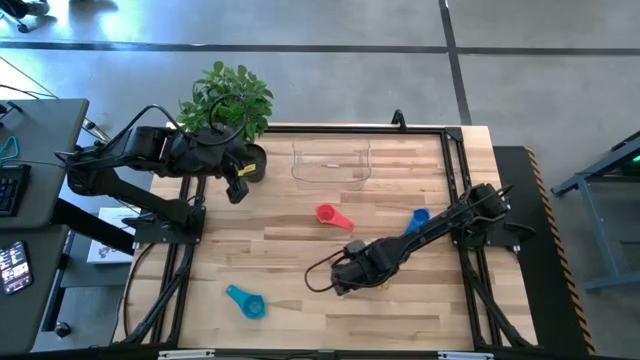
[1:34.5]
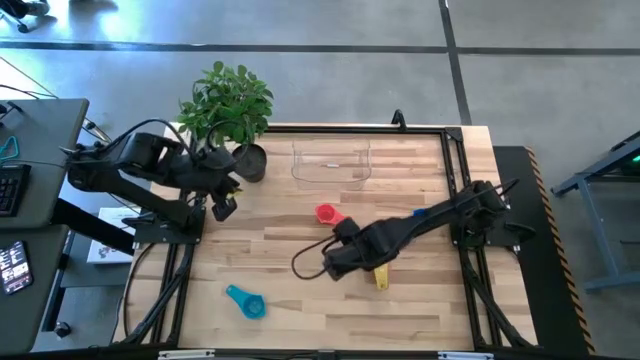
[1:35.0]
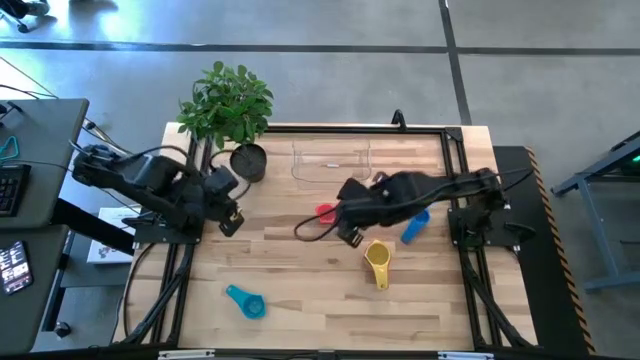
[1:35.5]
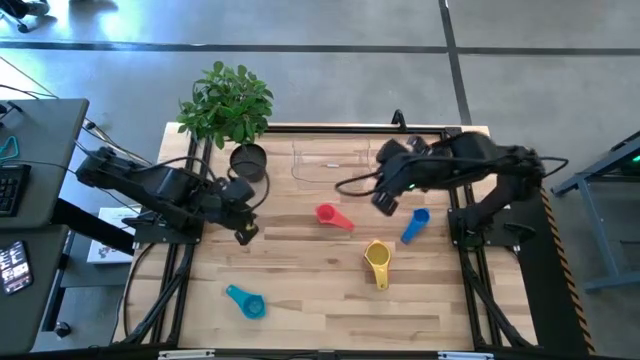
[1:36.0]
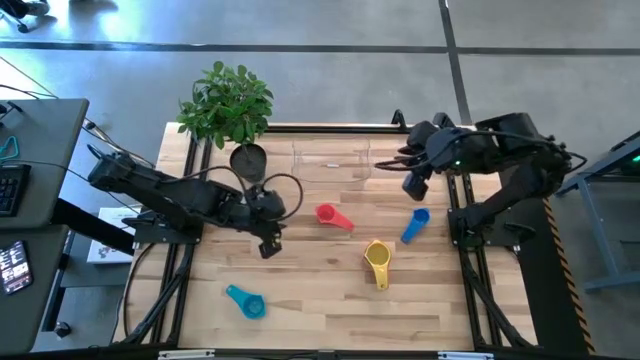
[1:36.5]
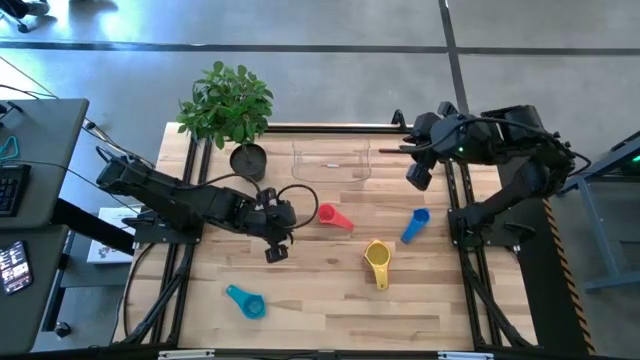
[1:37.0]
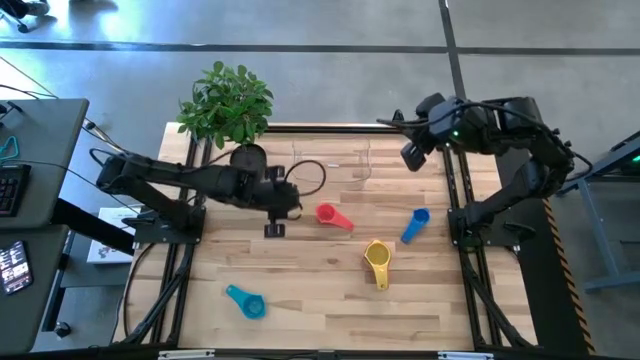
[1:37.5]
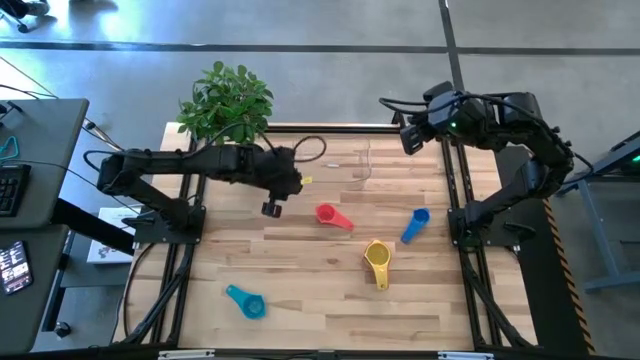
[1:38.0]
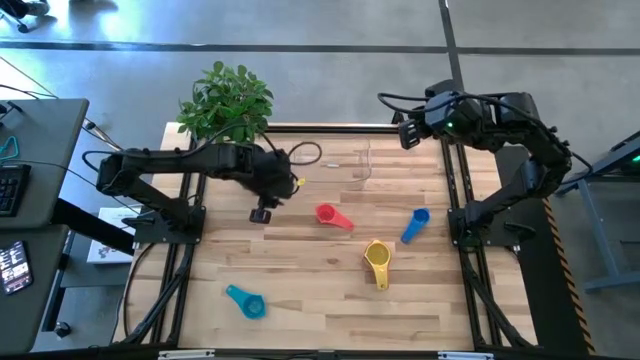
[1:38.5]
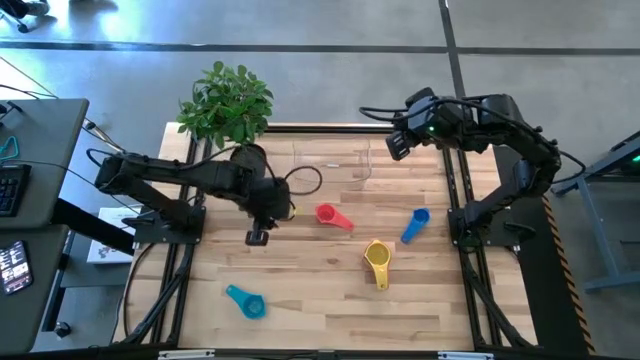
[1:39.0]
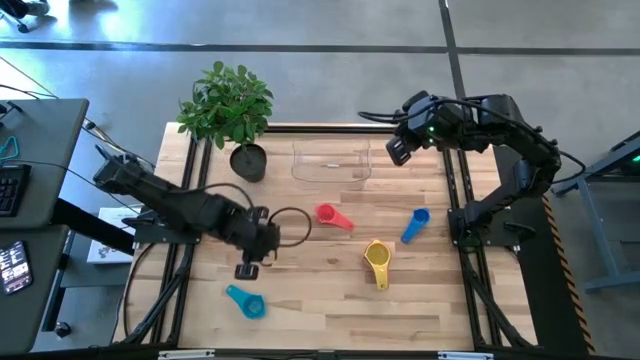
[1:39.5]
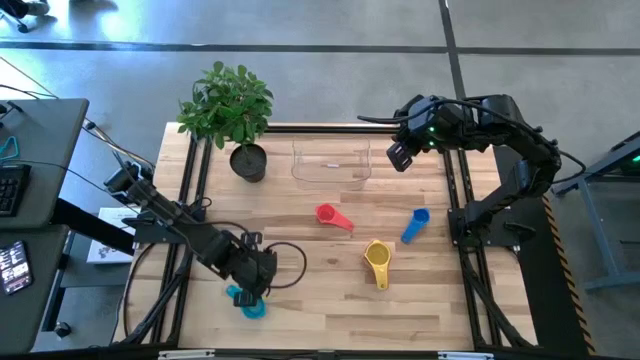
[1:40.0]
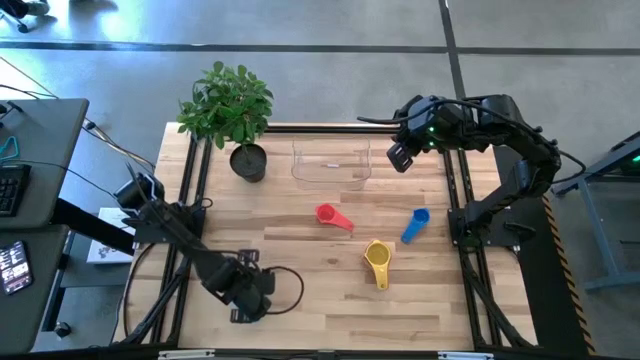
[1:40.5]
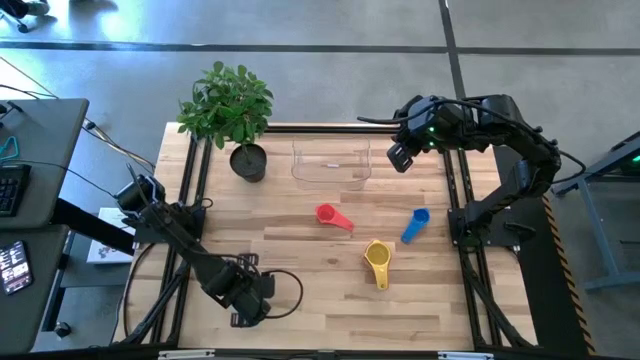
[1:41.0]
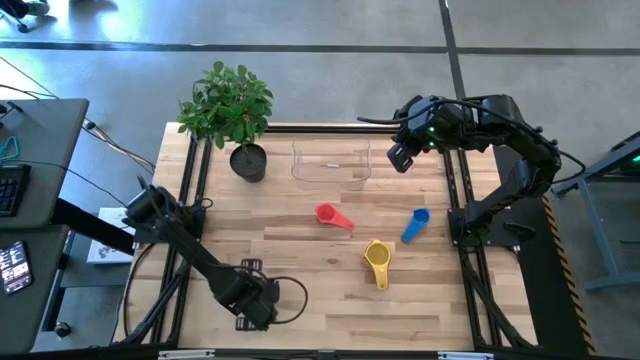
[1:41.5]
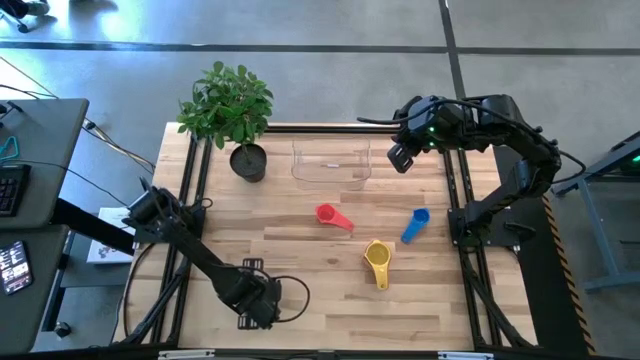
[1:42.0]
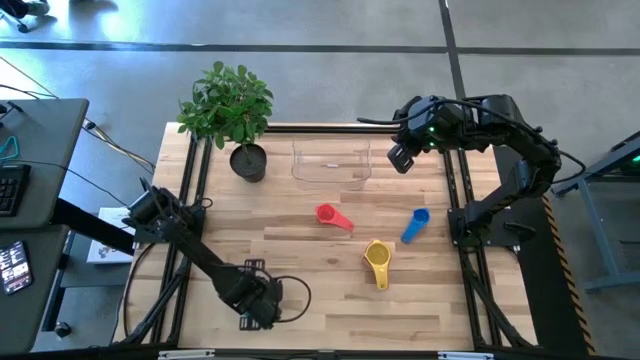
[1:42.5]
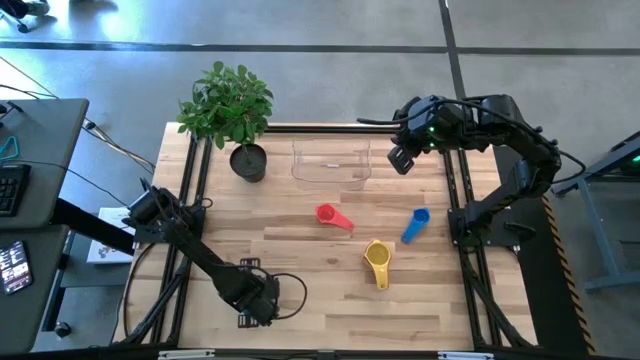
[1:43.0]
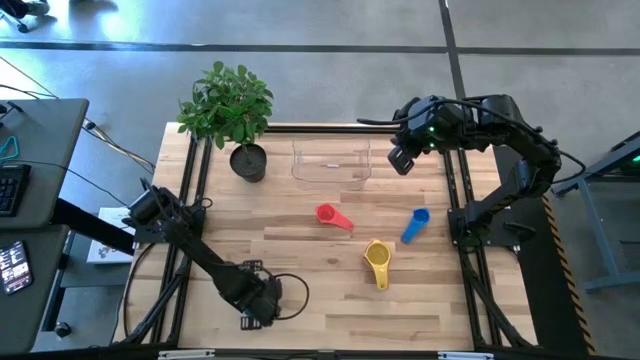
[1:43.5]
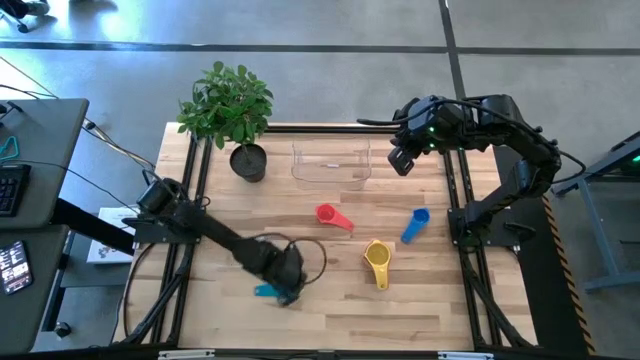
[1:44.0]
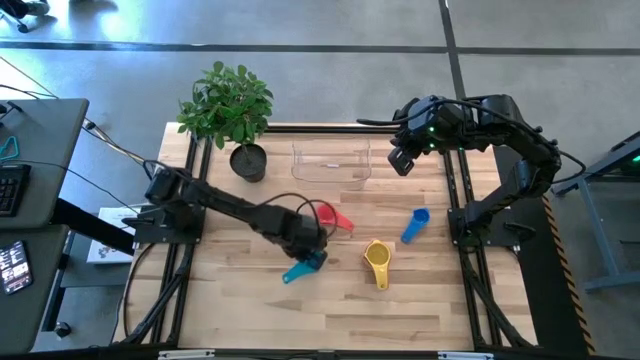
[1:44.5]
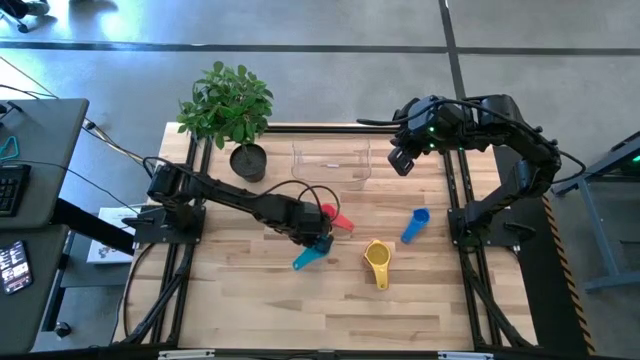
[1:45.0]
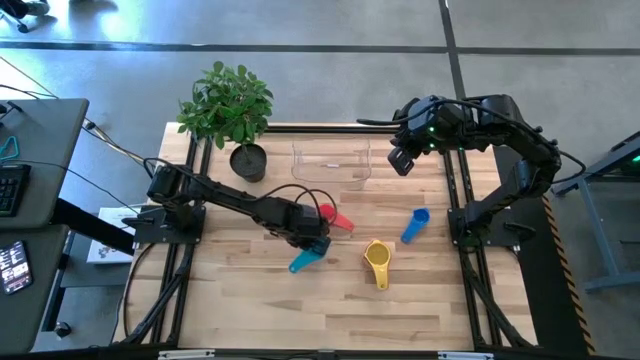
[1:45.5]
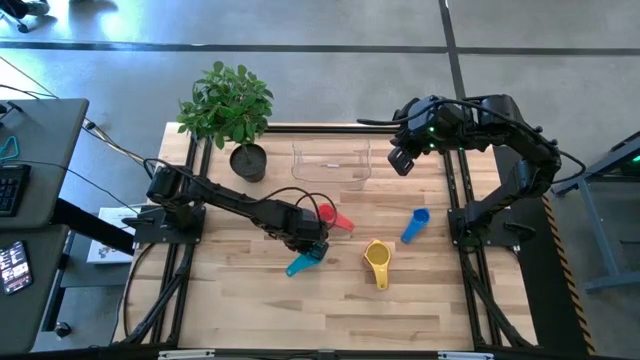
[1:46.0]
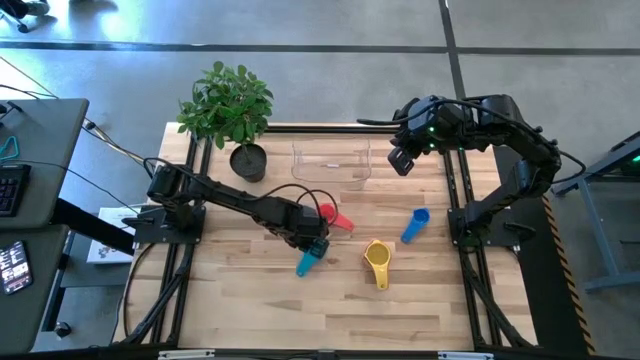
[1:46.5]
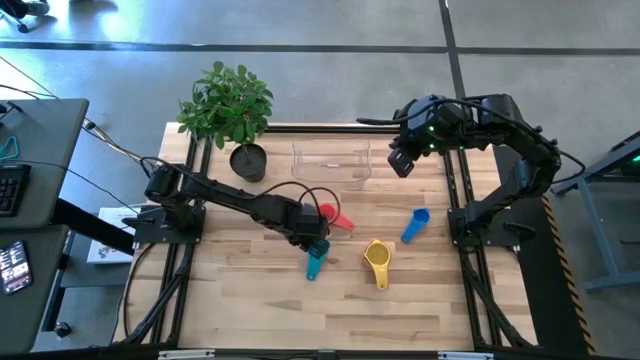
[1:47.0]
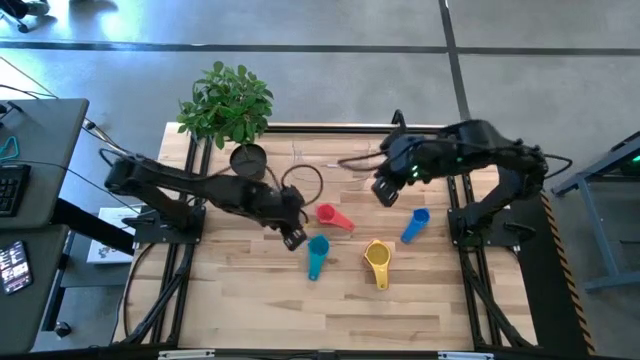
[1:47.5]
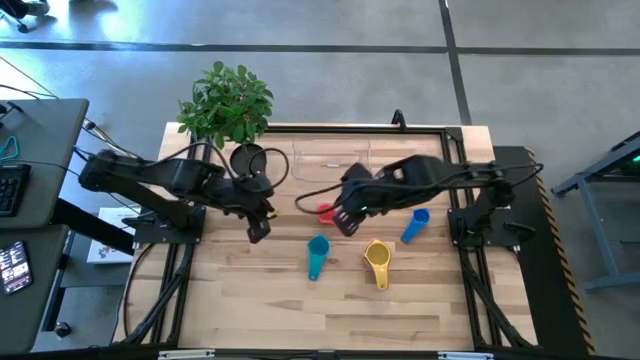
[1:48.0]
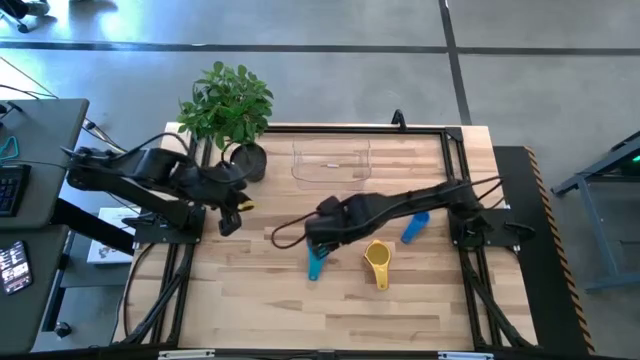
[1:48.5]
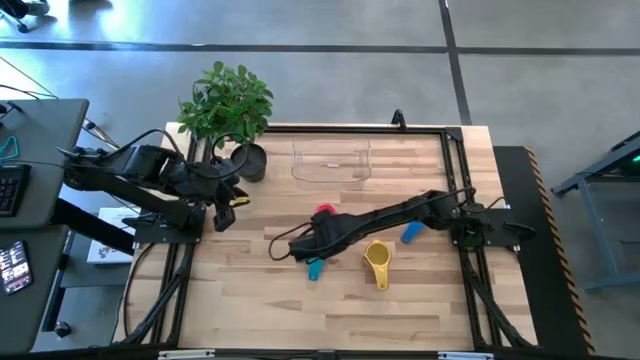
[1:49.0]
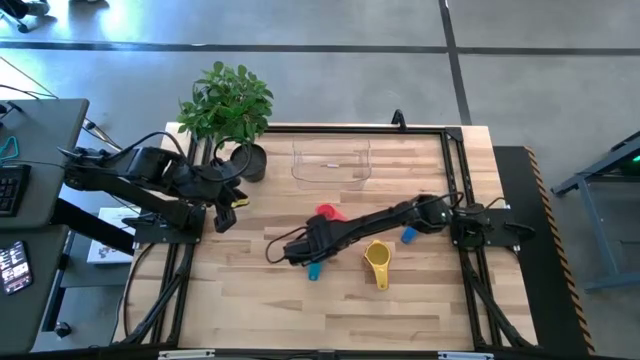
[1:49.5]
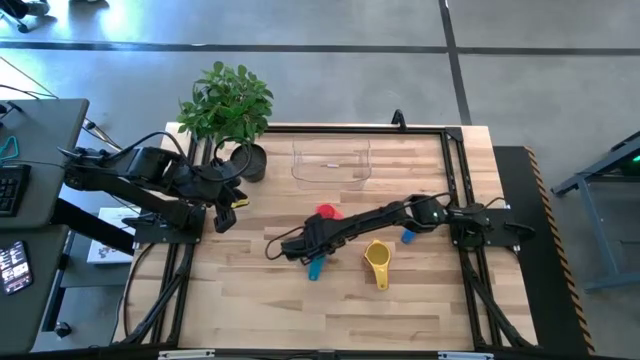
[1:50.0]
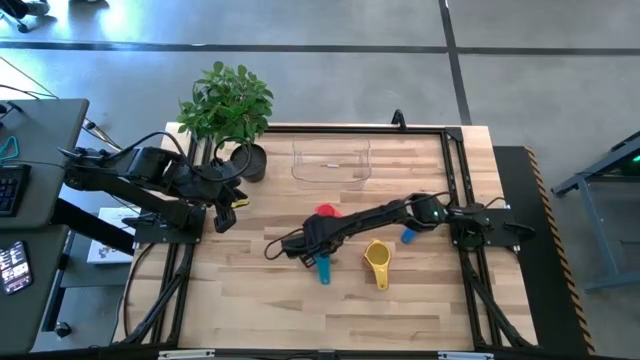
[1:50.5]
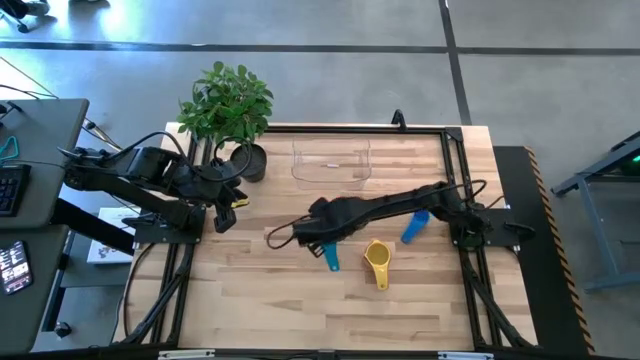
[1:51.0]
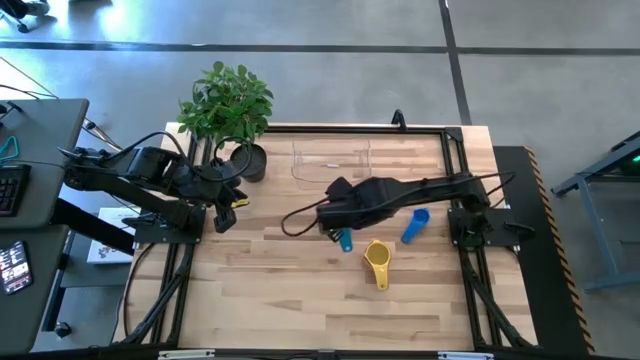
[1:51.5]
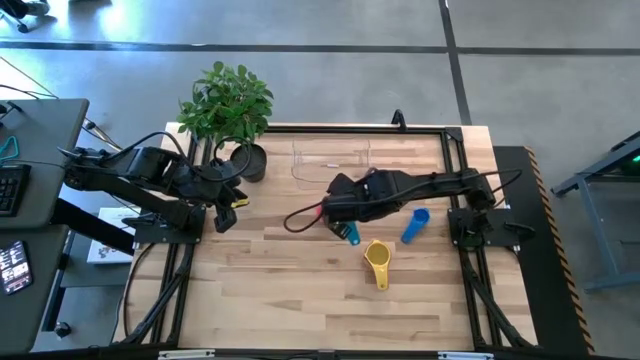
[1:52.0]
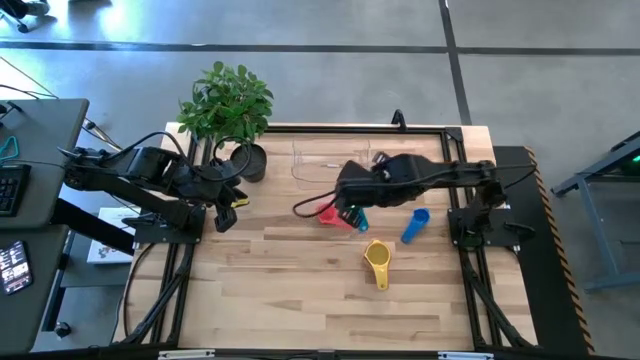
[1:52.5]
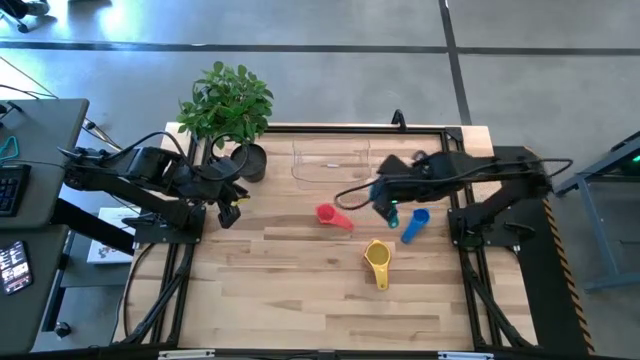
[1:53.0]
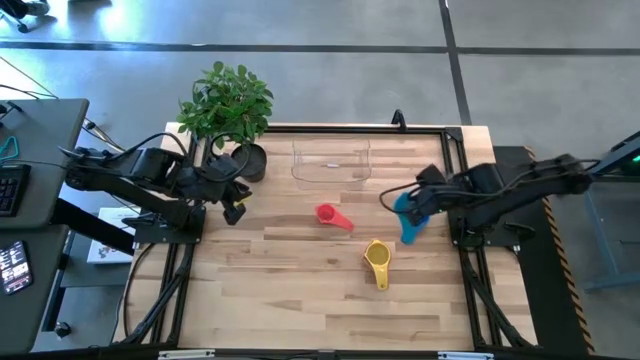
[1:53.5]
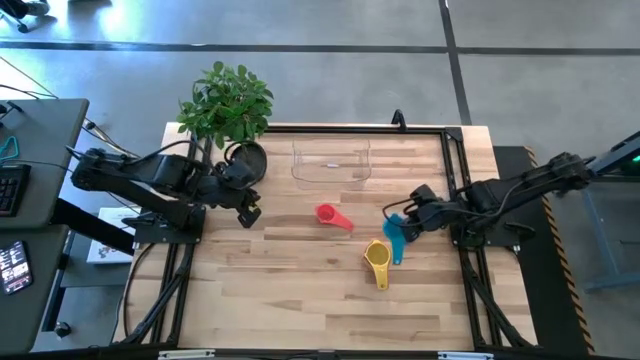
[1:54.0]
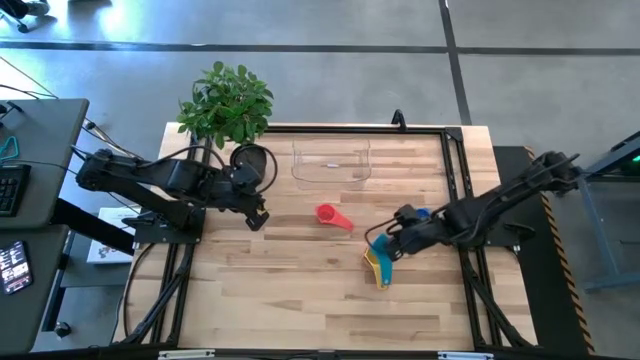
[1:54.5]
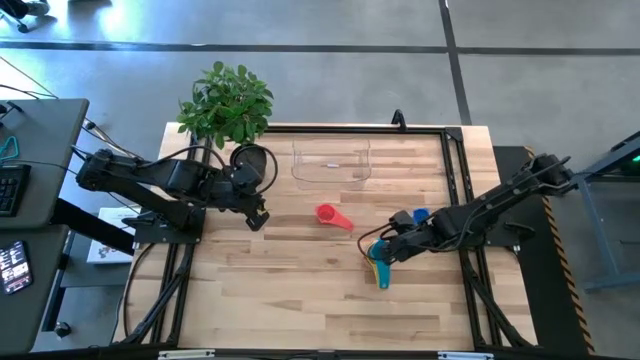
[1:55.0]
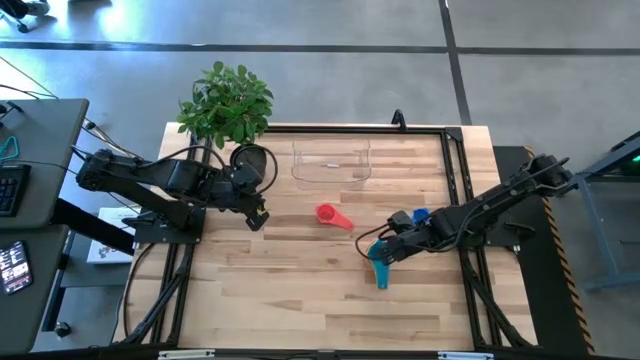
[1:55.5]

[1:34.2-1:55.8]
Task: Nest measuring cups in basket
Stack the light blue measuring cup on top of the yellow measuring cup
